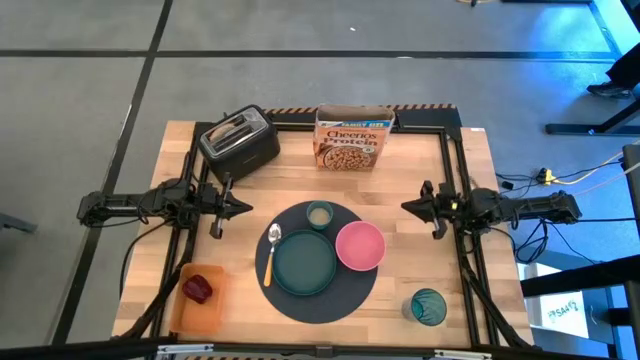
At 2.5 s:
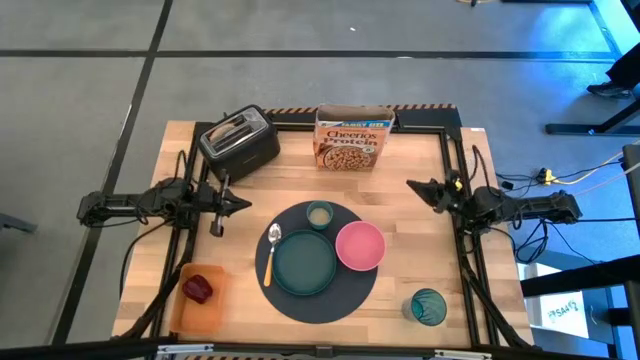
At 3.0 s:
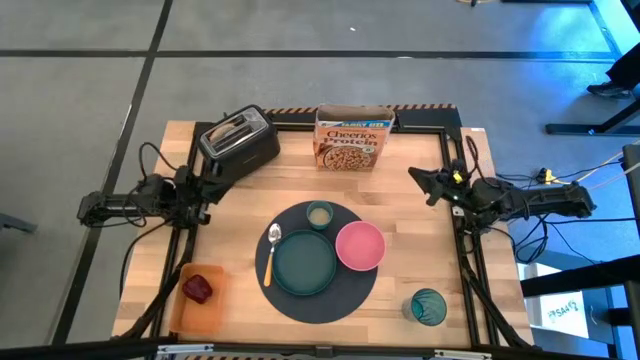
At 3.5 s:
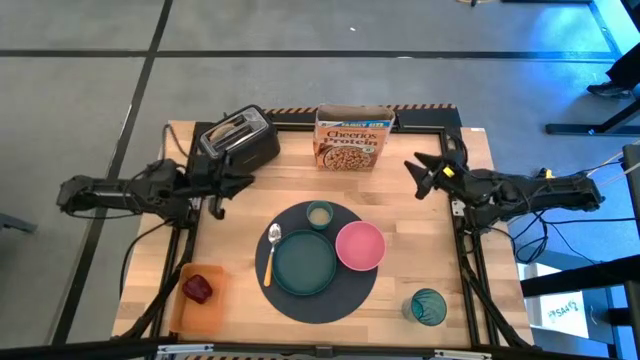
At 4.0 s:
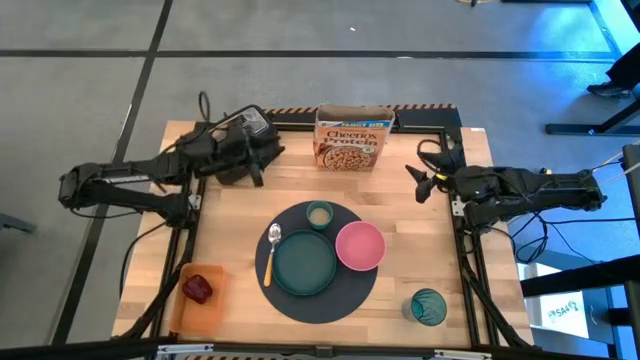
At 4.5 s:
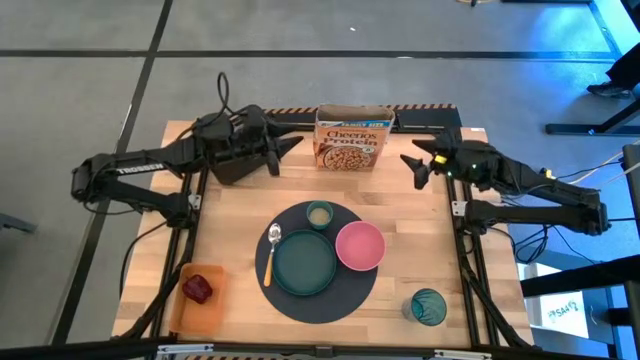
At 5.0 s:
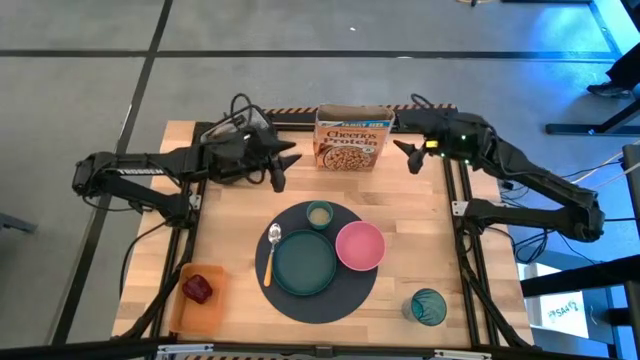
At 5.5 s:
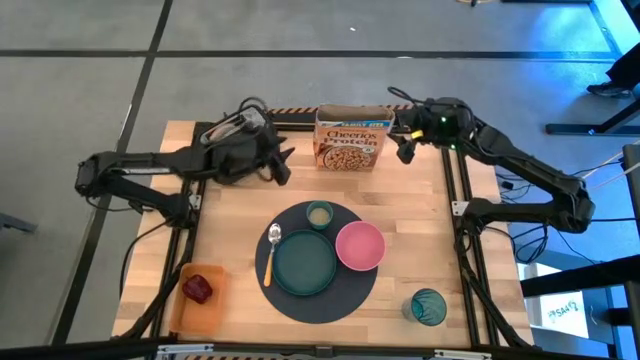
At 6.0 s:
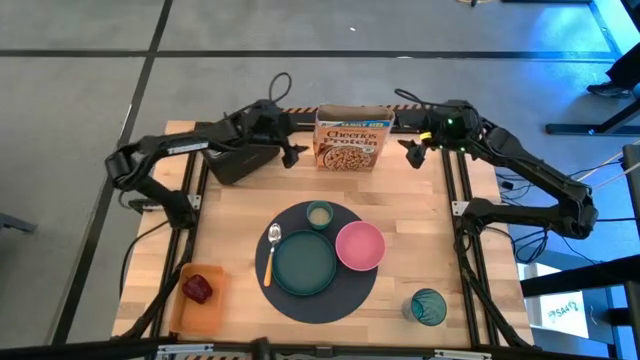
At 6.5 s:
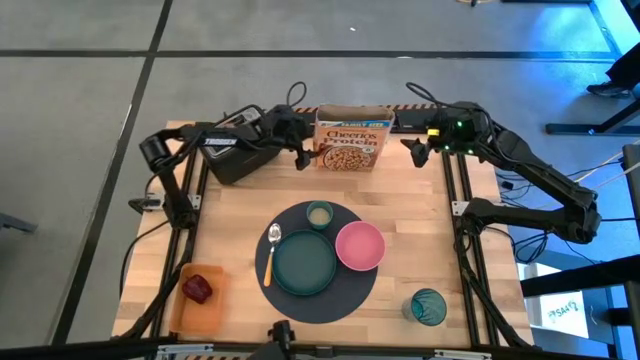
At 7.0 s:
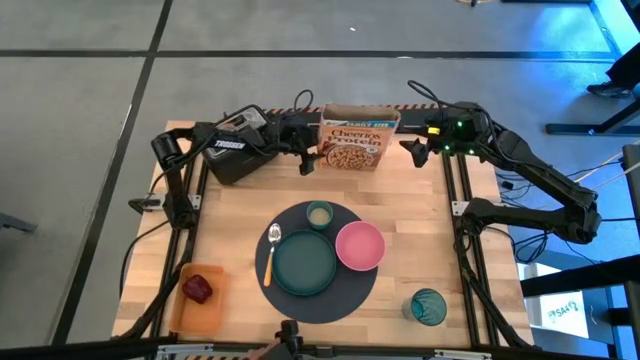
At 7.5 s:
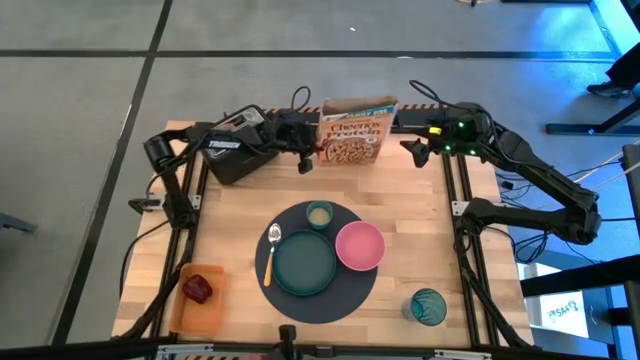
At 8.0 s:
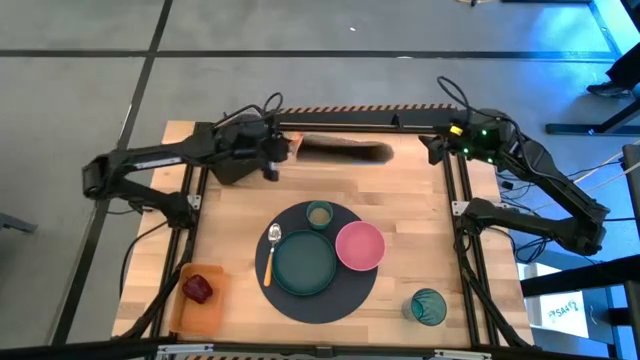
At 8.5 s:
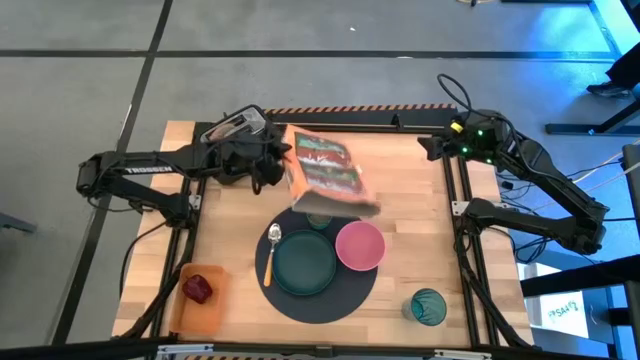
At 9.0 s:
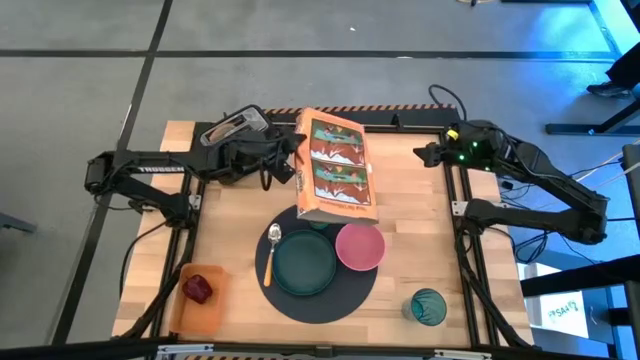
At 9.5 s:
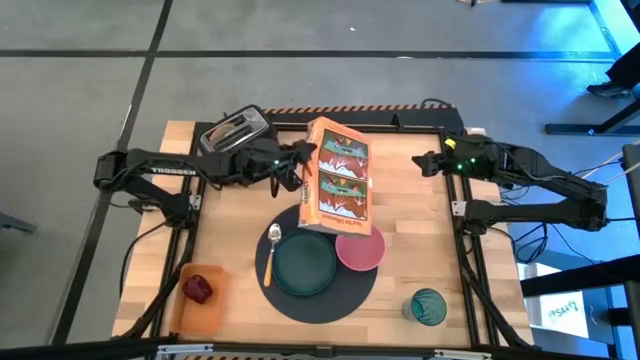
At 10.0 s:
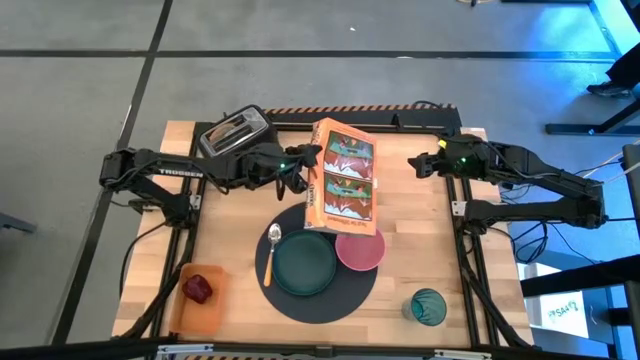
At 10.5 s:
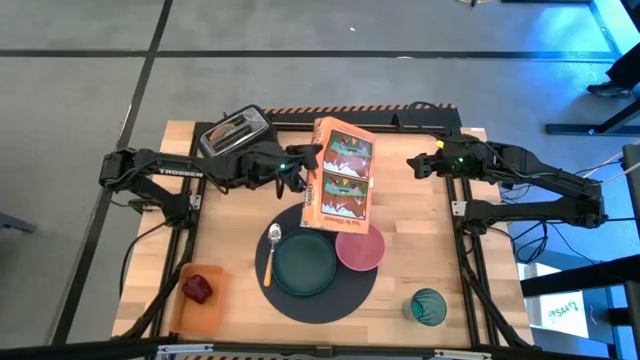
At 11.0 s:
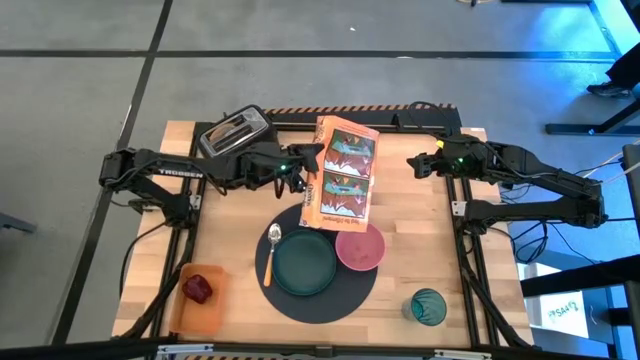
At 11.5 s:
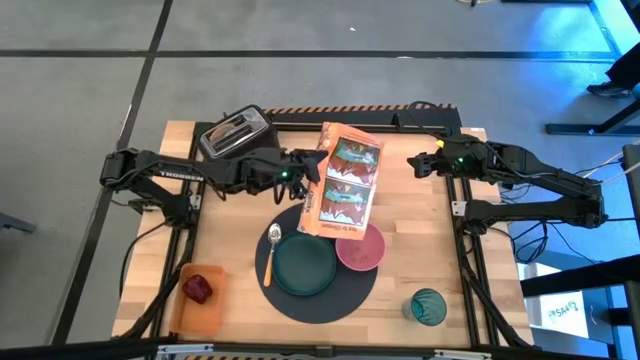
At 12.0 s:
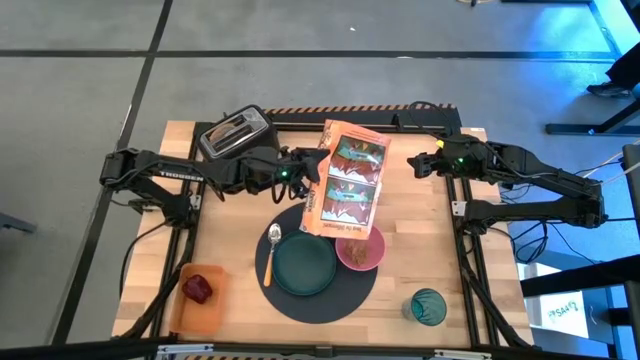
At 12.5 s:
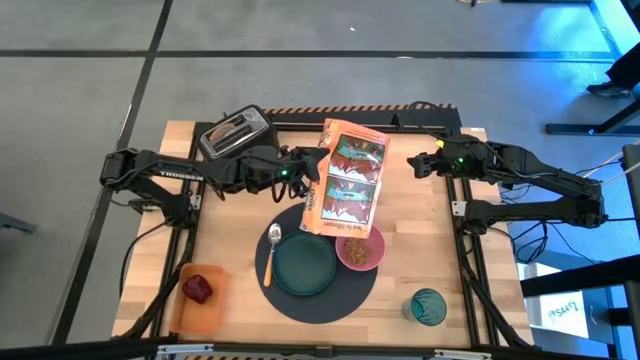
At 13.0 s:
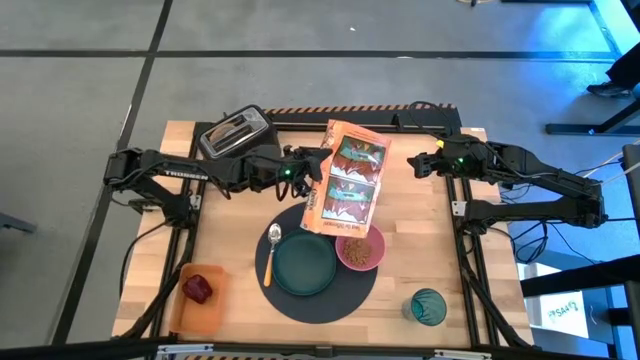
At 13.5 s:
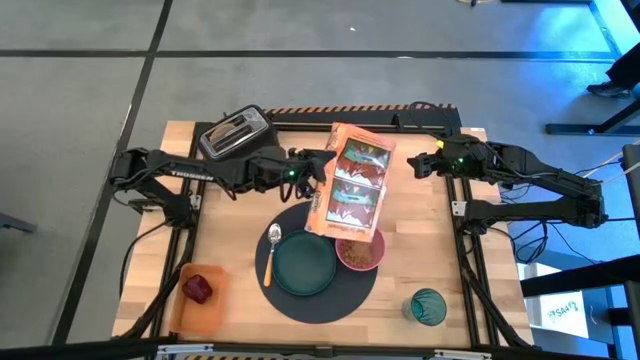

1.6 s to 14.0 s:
Task: Arrange a breakfast setting
Pour the cereal from the cereal box into the pink bowl

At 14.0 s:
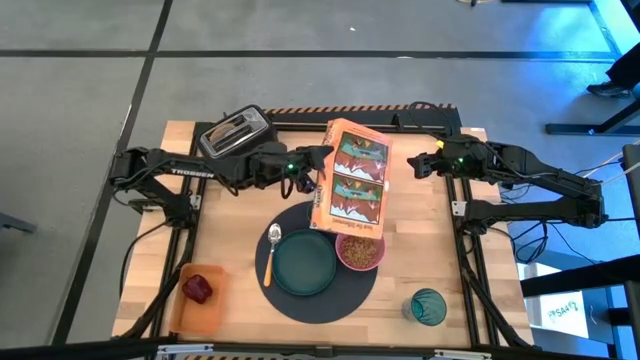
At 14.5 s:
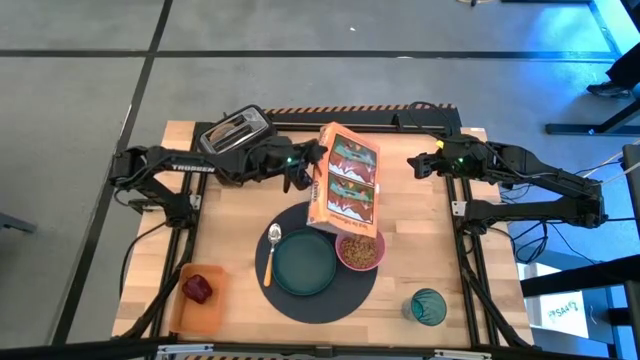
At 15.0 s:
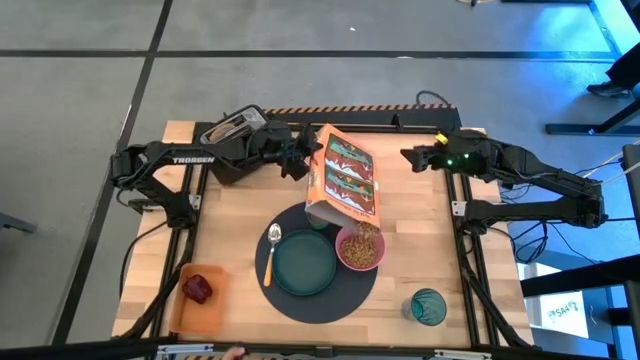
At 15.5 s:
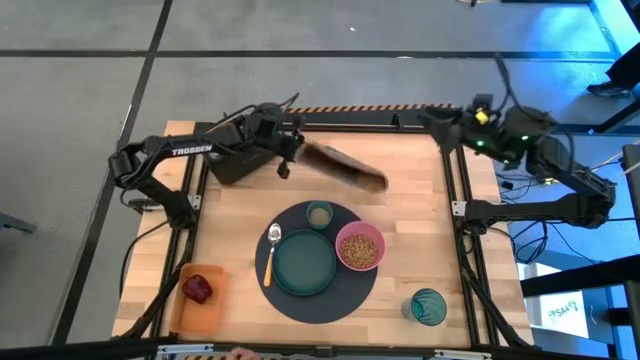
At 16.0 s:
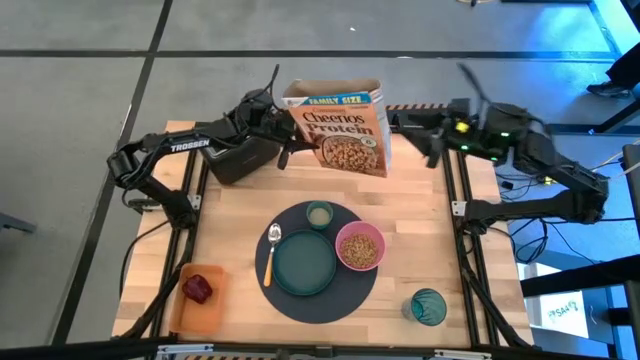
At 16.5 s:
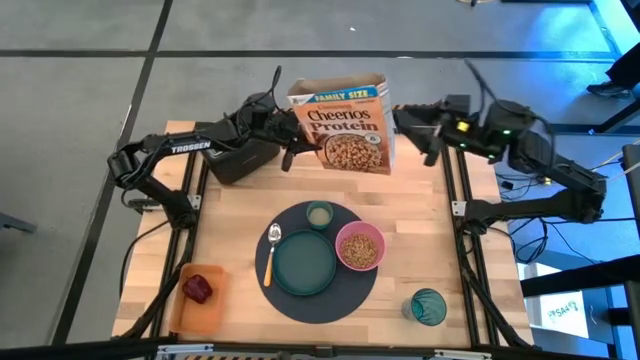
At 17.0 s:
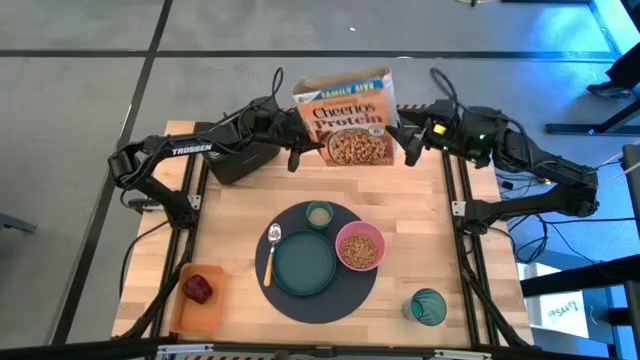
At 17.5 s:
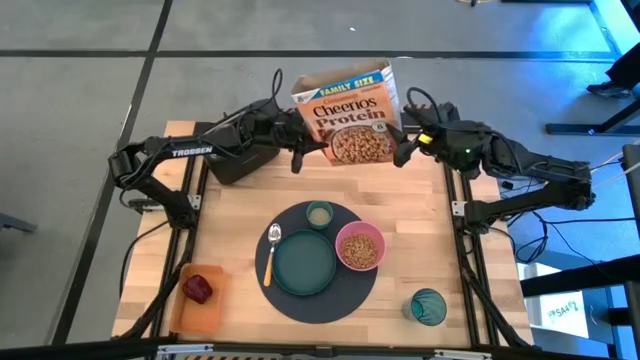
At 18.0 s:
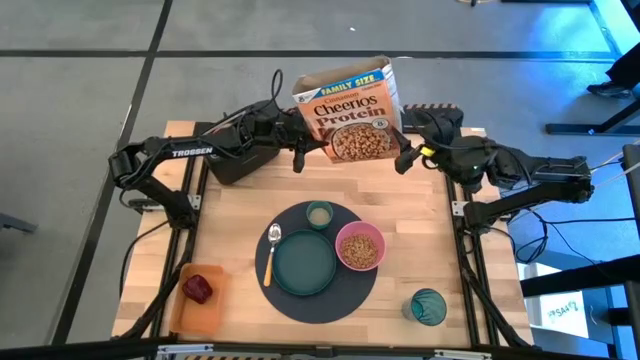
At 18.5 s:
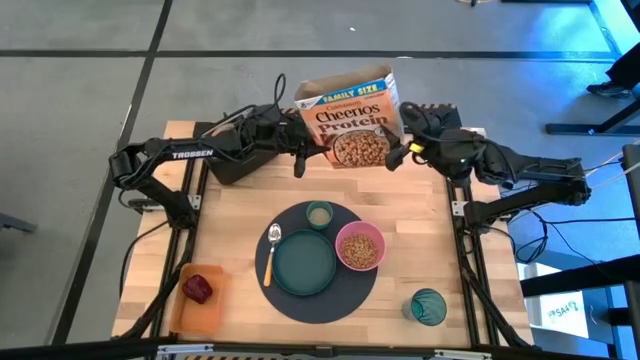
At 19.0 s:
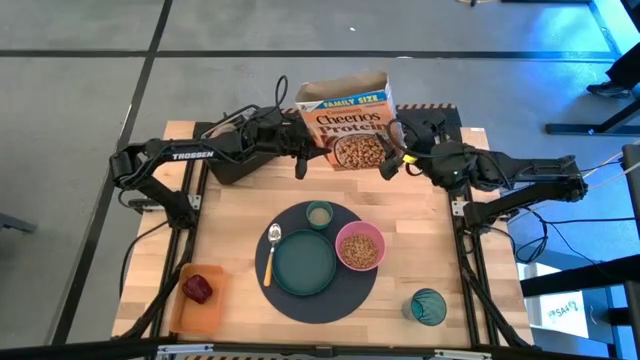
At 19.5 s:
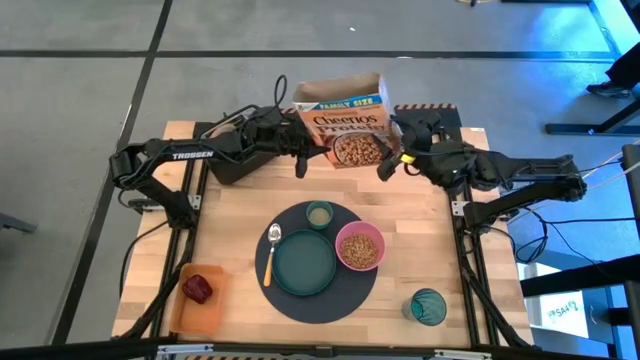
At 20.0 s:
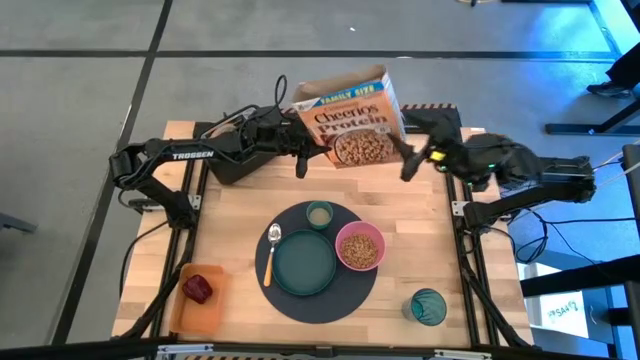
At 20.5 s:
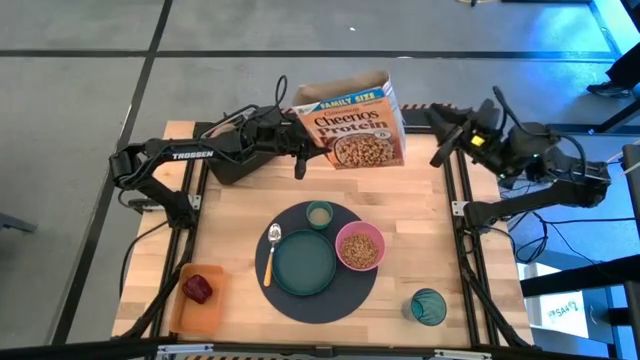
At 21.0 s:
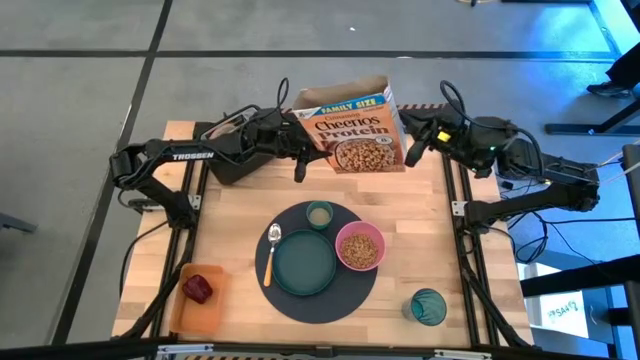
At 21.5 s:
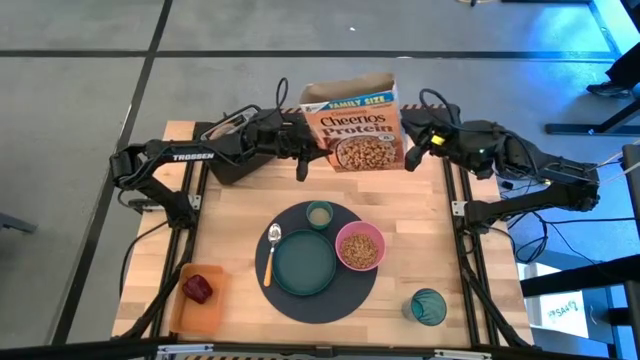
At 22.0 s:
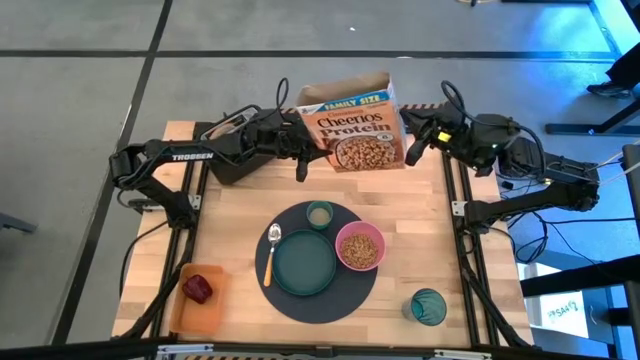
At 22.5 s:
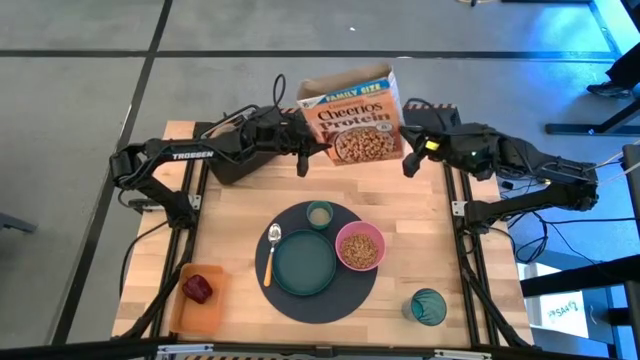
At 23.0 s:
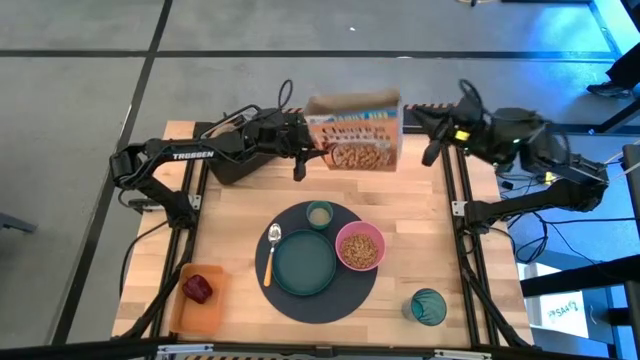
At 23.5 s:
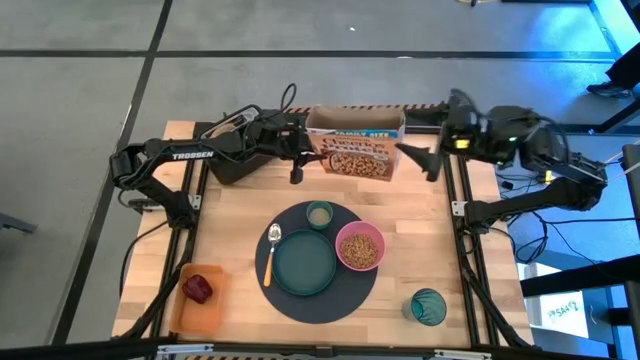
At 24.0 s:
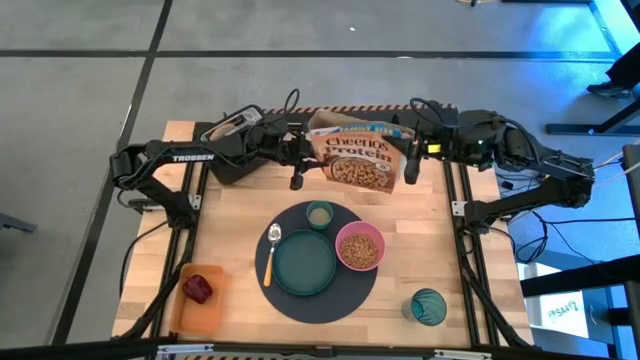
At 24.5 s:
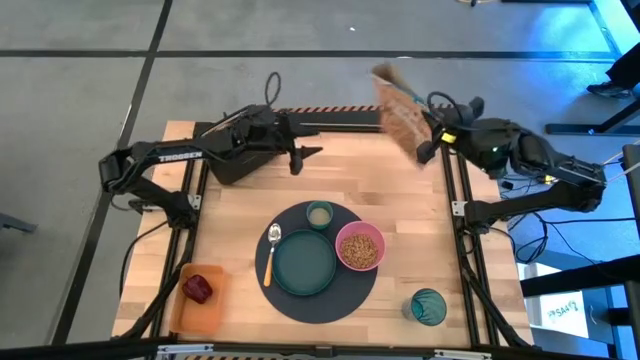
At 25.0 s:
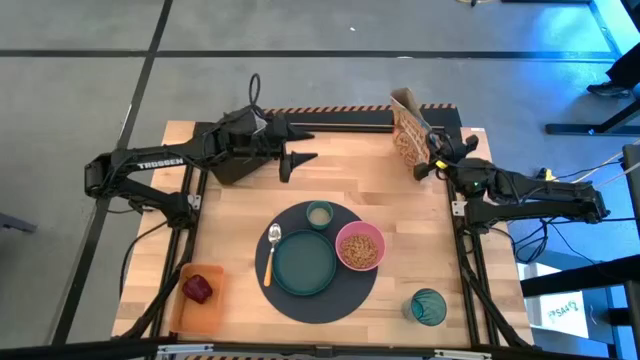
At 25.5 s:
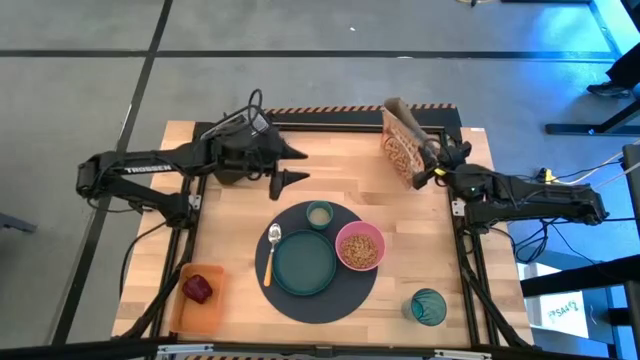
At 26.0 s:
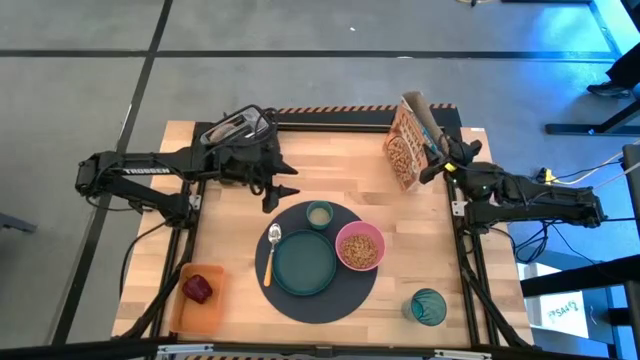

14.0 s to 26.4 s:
Pour the cereal from the cereal box into the pink bowl
